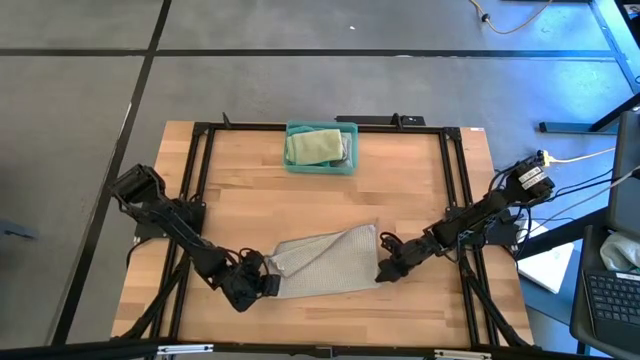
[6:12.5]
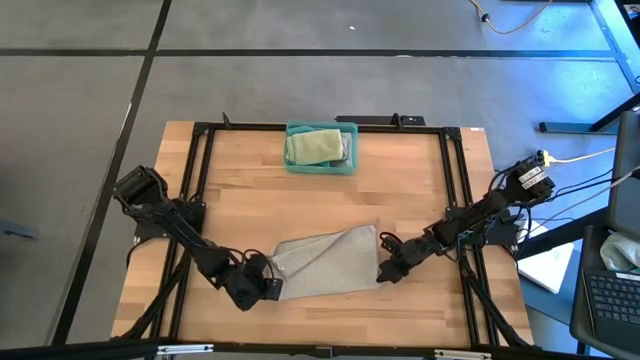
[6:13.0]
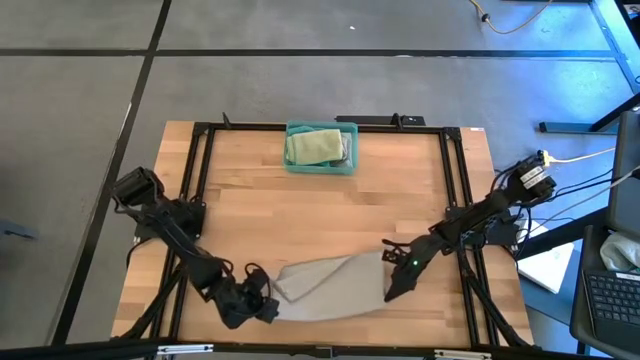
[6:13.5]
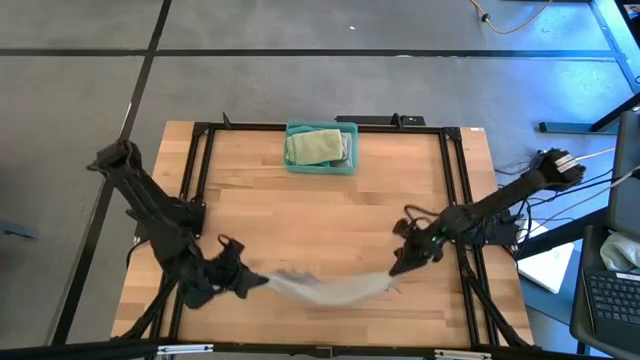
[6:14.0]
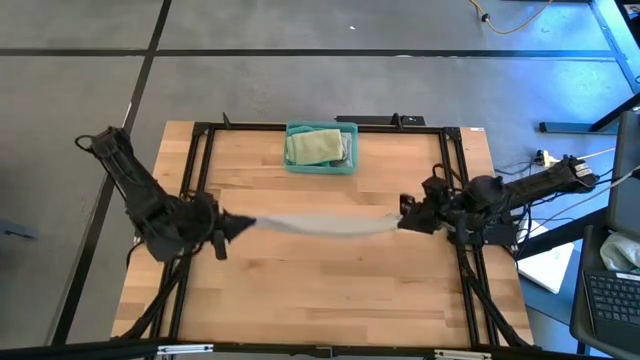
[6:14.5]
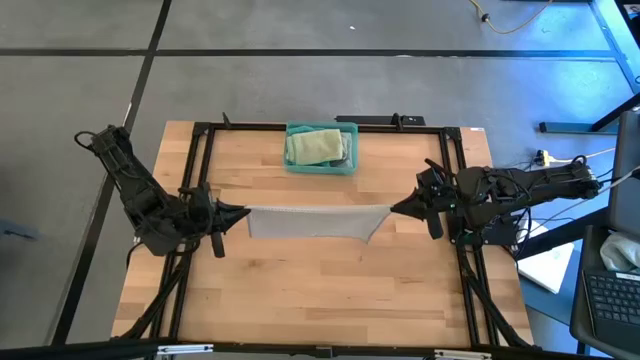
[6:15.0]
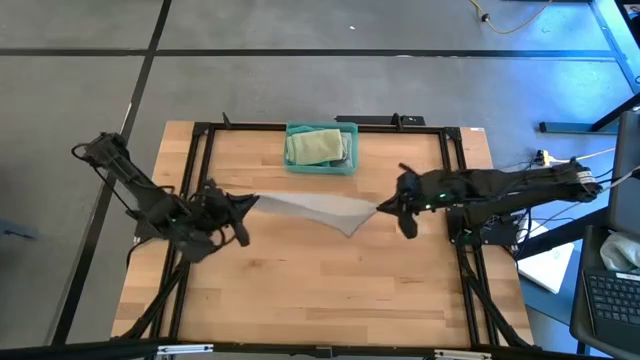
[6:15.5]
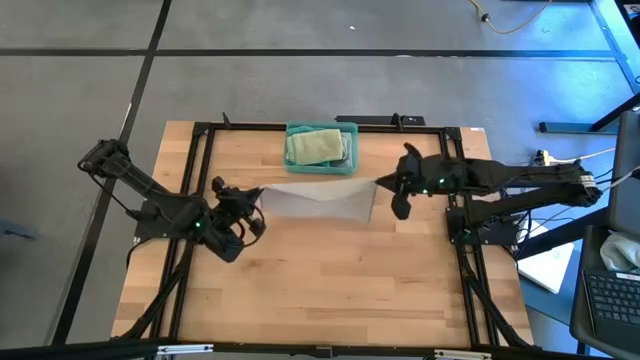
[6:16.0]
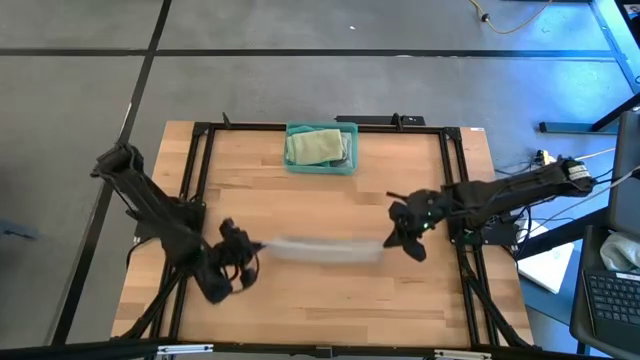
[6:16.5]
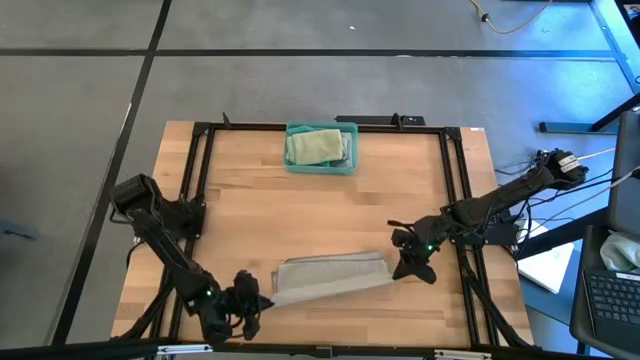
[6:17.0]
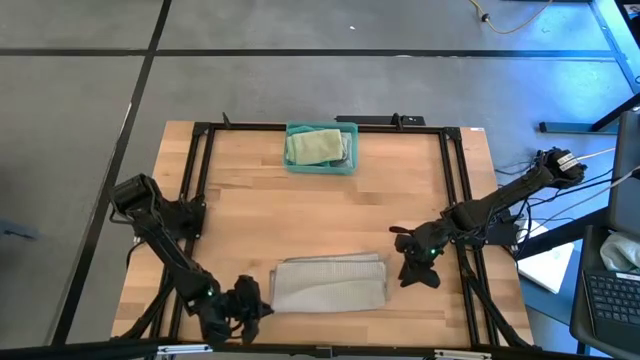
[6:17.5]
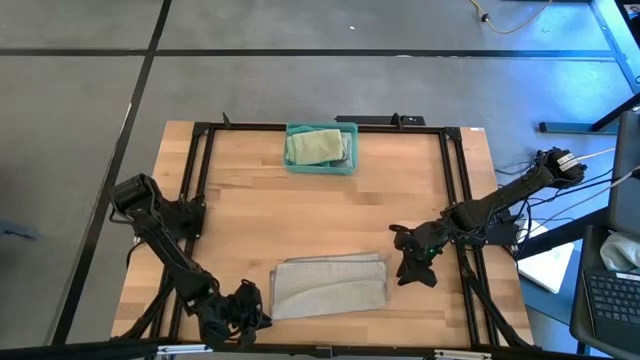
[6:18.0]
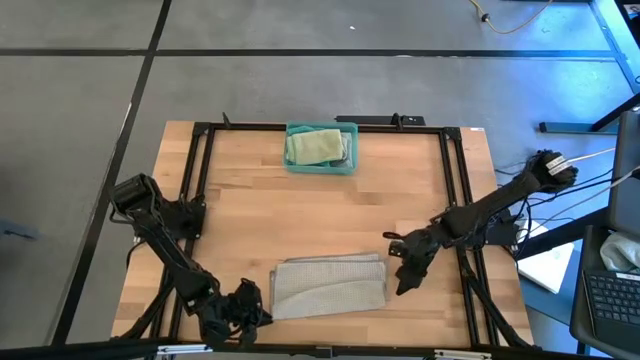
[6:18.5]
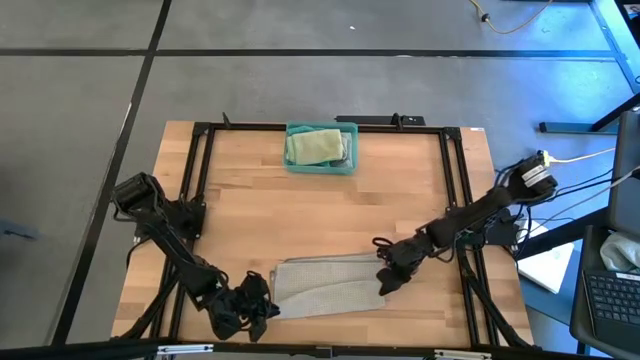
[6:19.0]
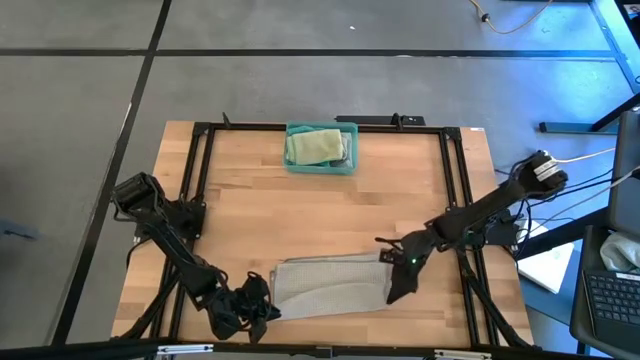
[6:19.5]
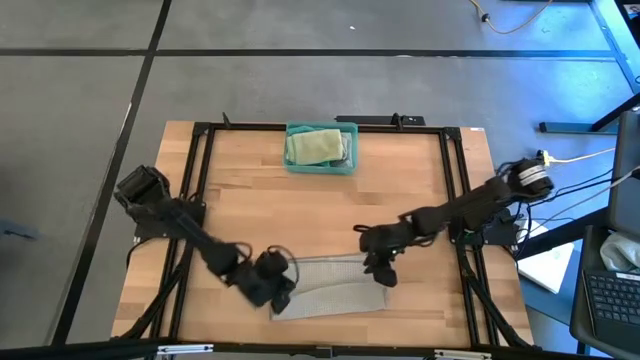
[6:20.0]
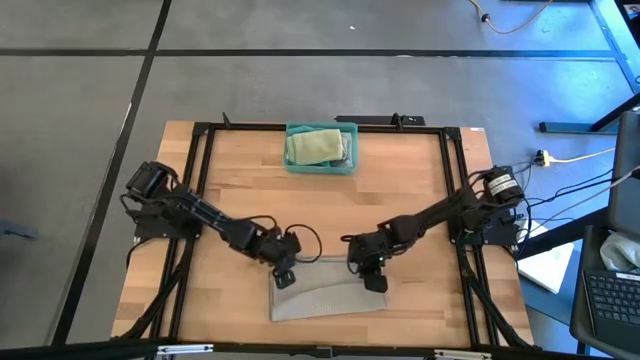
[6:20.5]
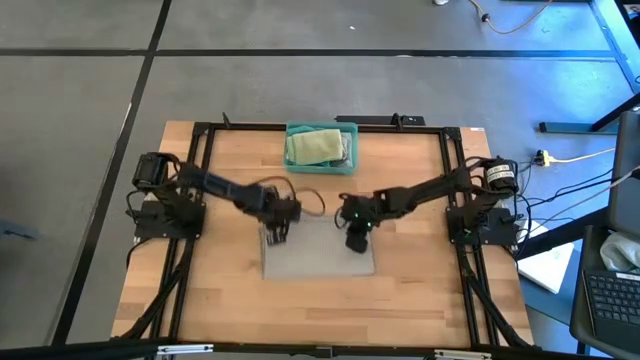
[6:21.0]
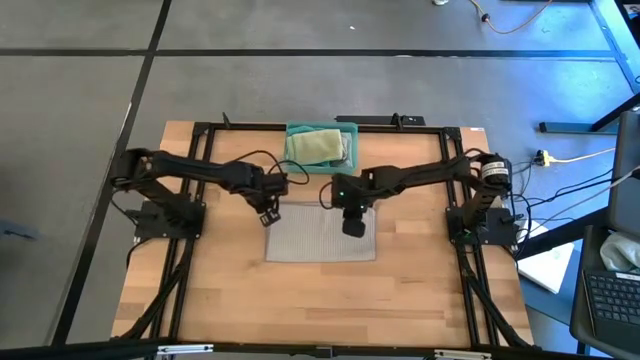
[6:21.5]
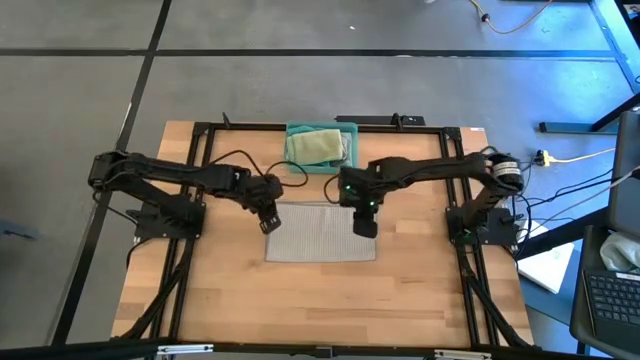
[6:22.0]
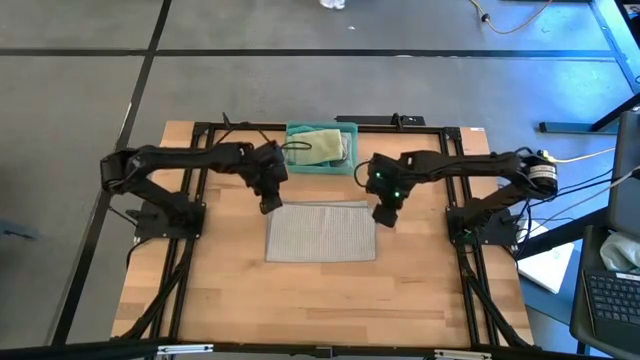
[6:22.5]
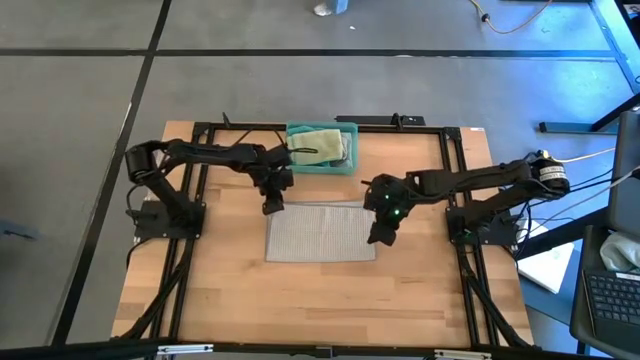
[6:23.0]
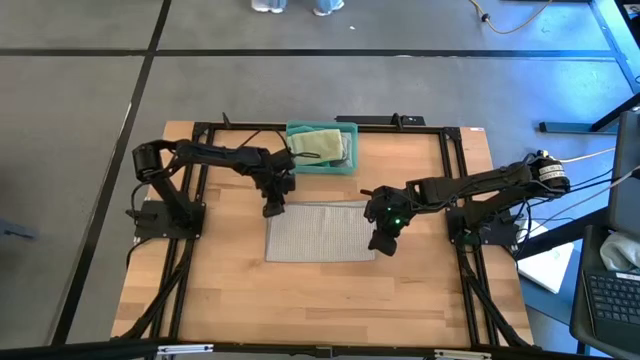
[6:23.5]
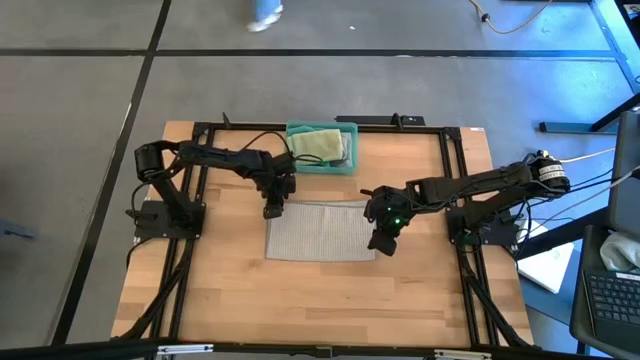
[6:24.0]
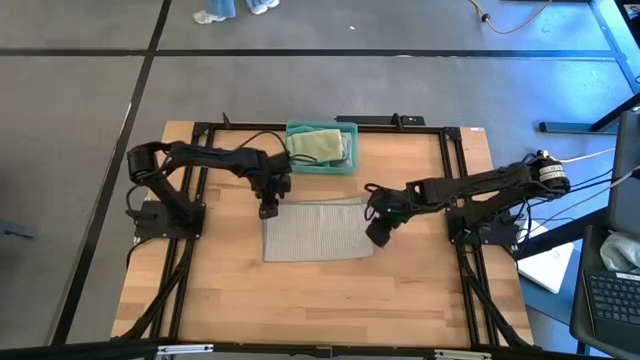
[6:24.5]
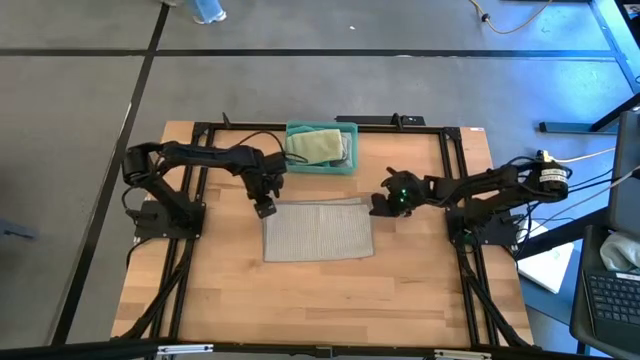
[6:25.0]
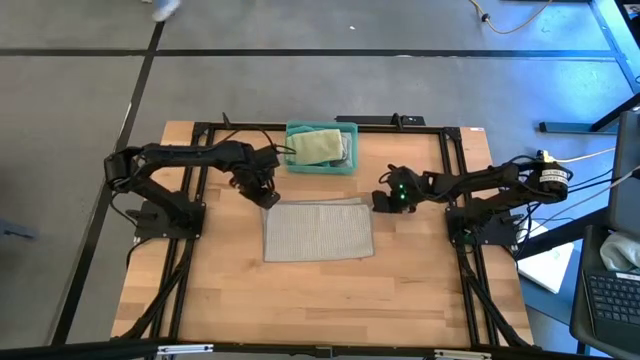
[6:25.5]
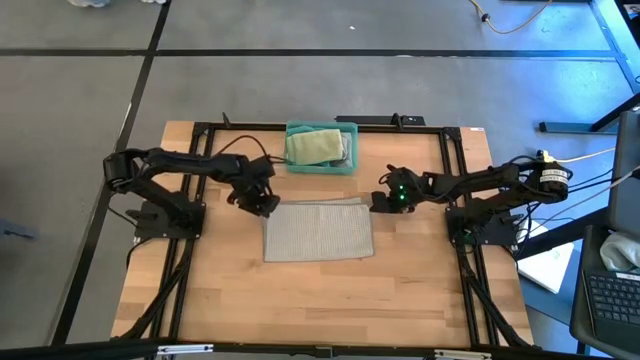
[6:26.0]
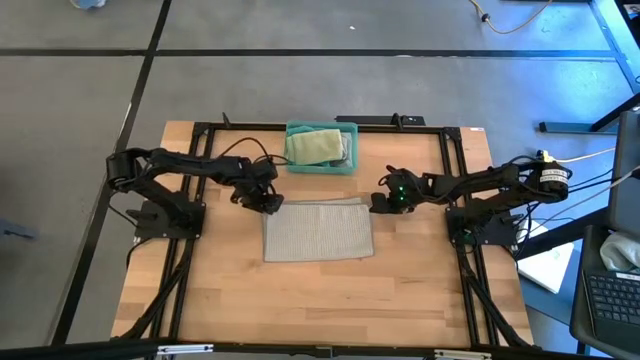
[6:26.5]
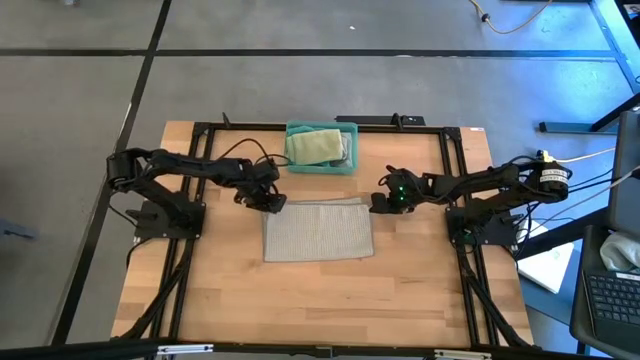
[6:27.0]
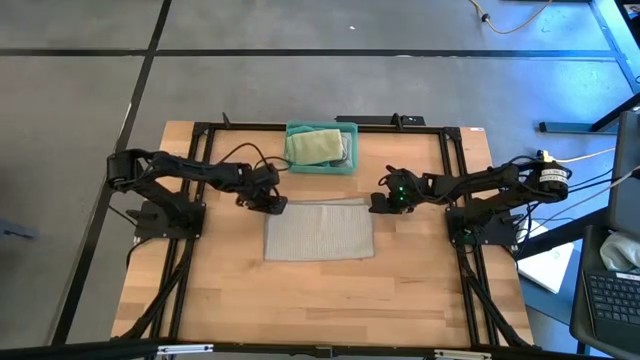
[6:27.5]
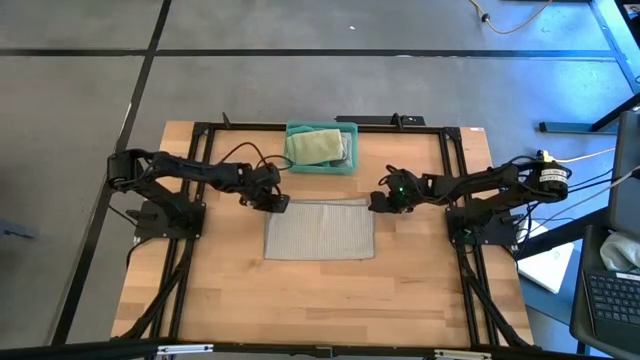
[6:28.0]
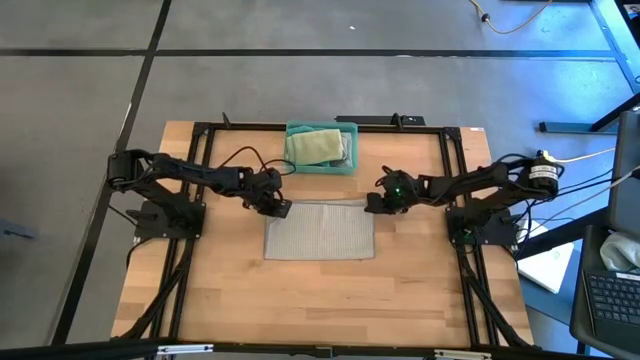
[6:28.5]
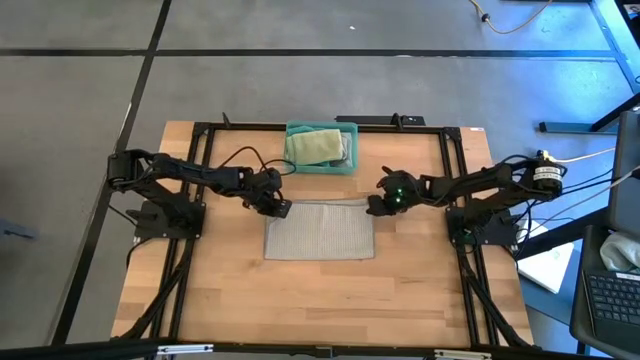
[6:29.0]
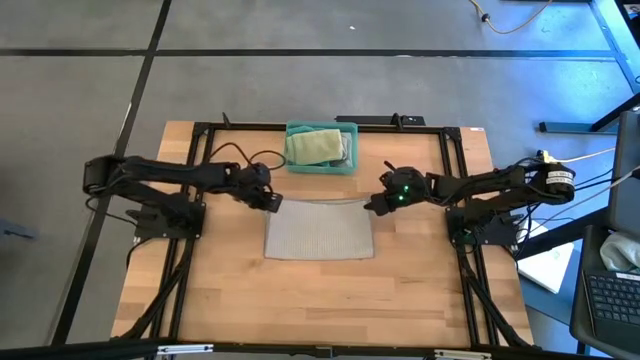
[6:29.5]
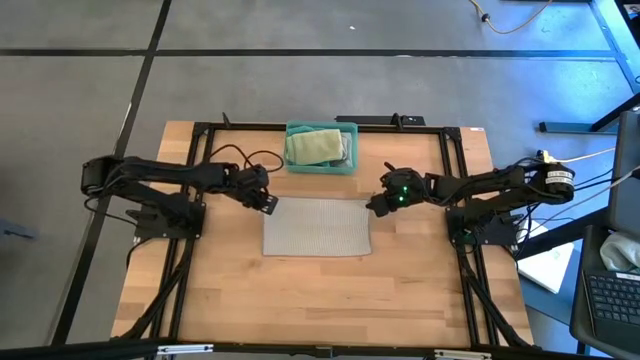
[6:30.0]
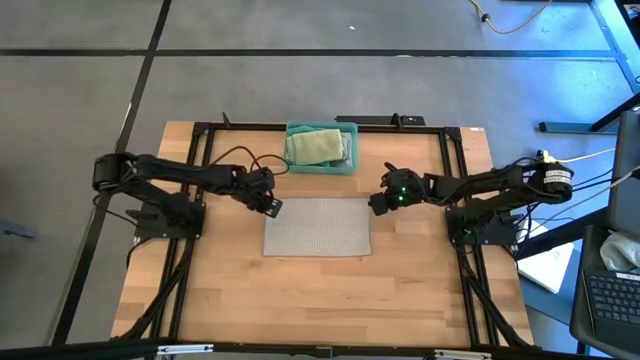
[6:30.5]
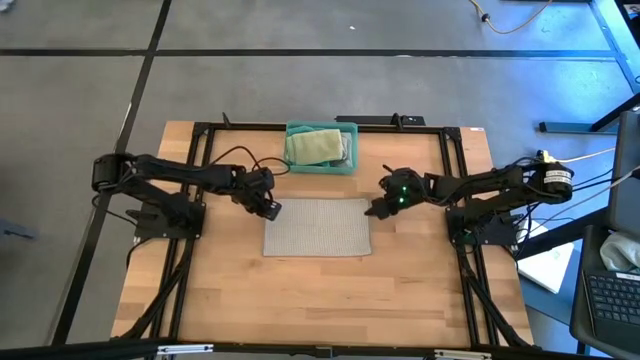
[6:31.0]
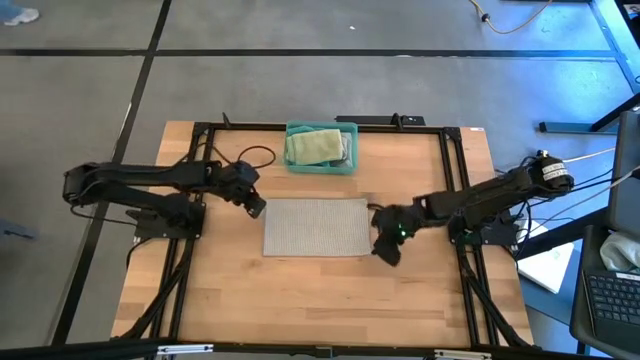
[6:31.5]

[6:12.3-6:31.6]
Task: Fold microfiber towels
Fold the gray towel
